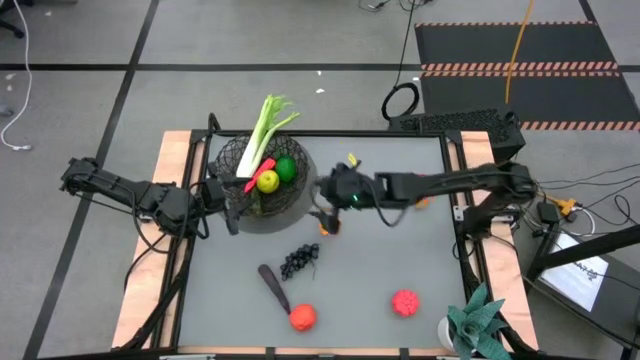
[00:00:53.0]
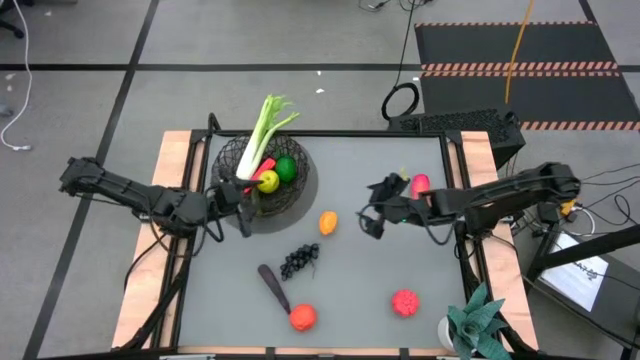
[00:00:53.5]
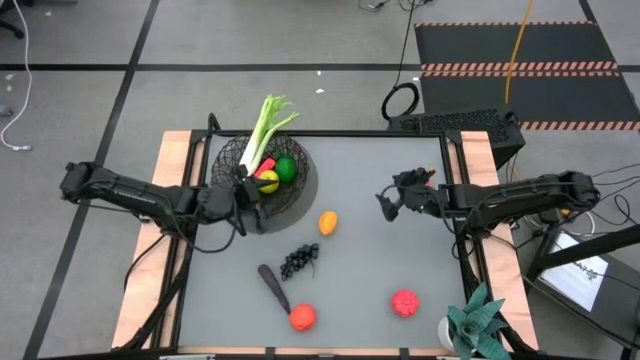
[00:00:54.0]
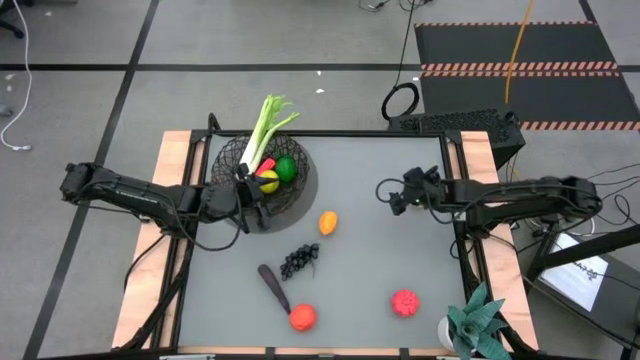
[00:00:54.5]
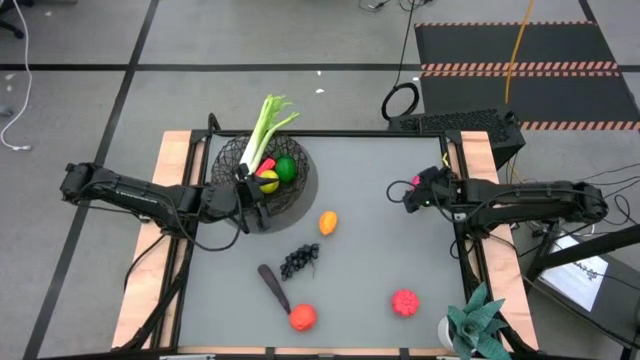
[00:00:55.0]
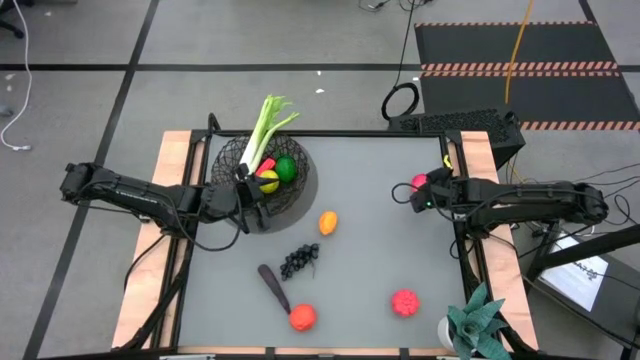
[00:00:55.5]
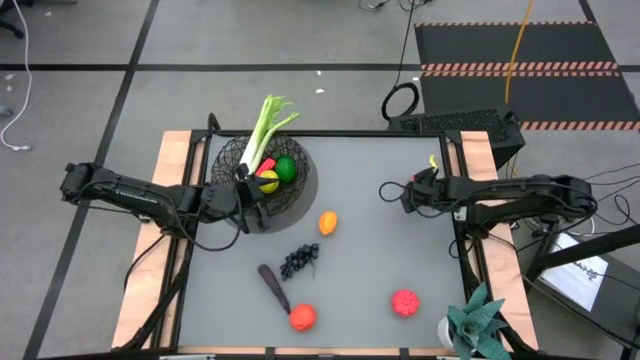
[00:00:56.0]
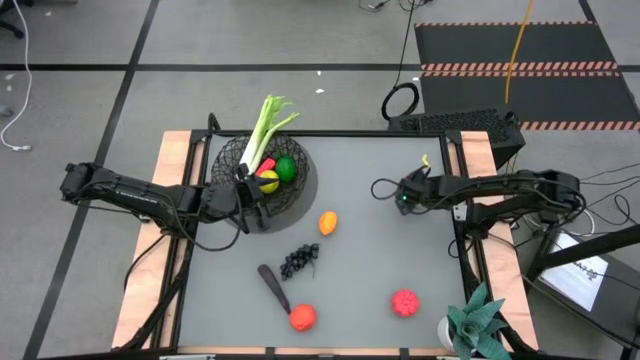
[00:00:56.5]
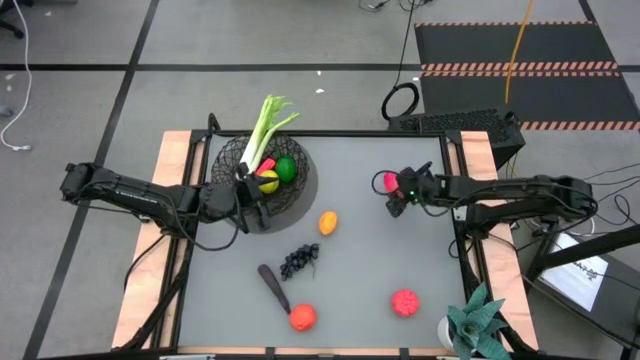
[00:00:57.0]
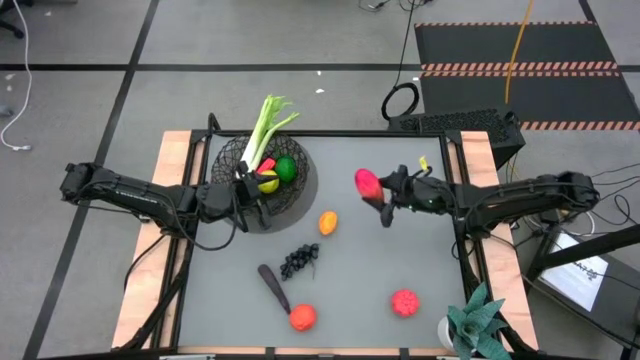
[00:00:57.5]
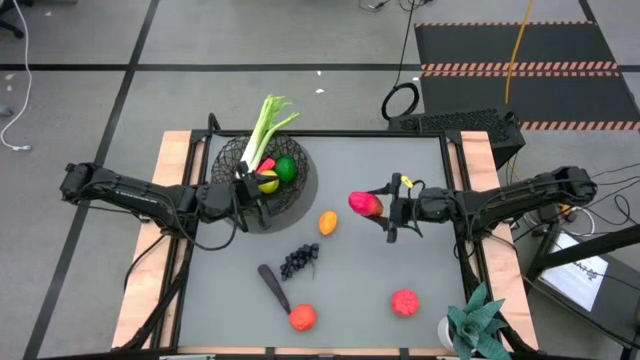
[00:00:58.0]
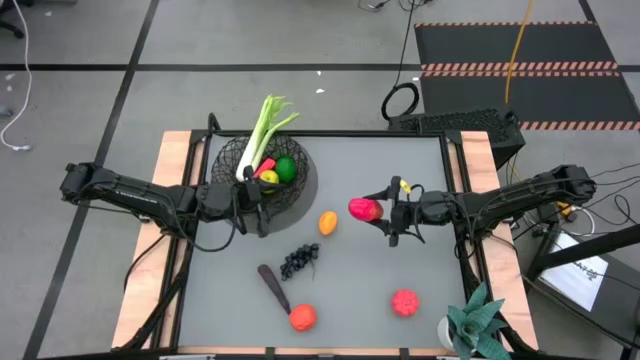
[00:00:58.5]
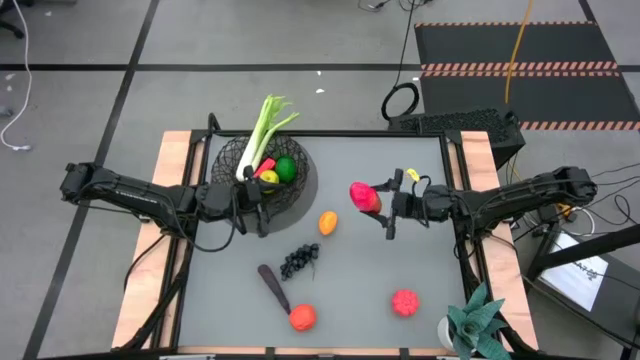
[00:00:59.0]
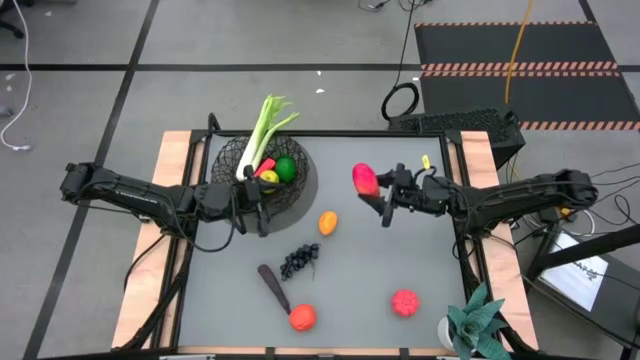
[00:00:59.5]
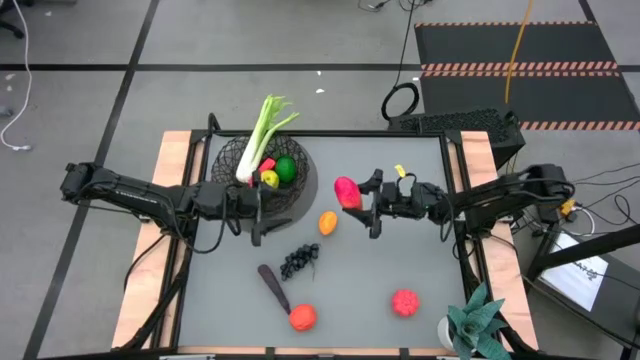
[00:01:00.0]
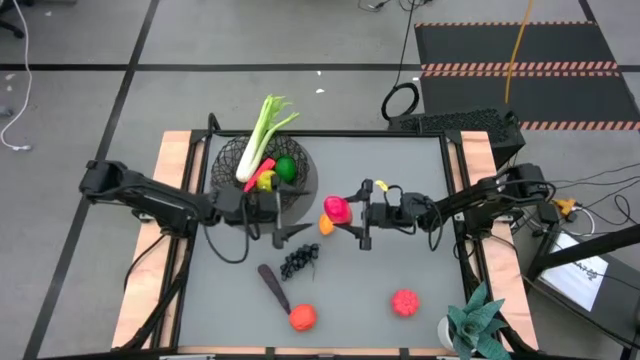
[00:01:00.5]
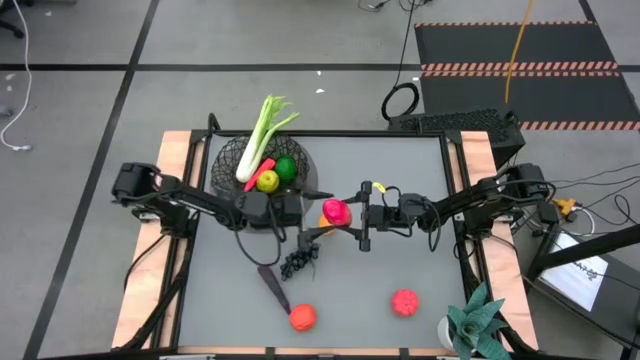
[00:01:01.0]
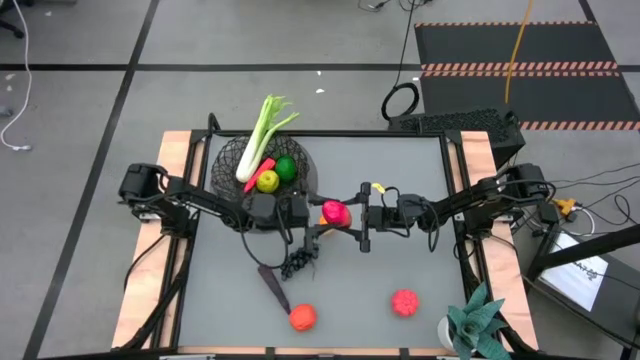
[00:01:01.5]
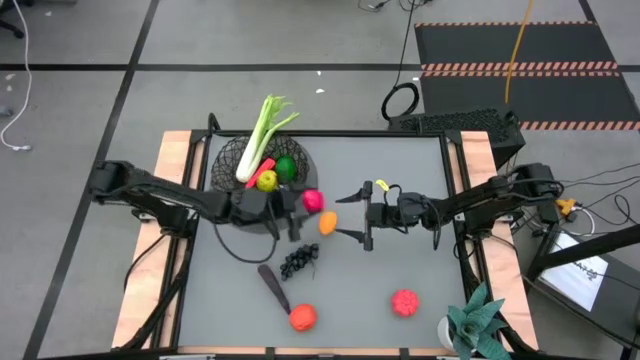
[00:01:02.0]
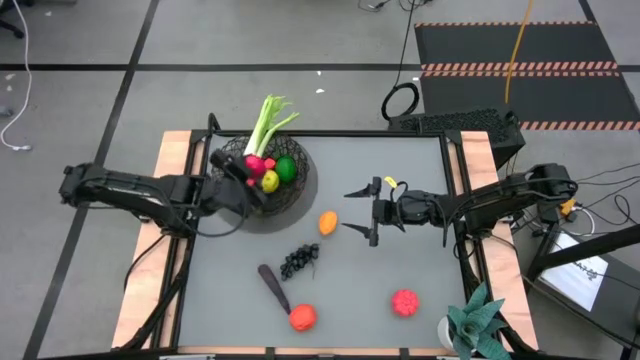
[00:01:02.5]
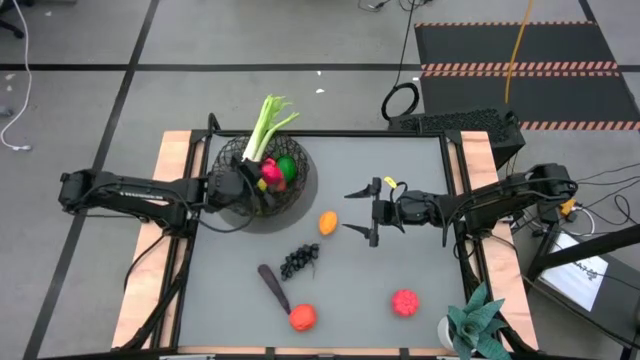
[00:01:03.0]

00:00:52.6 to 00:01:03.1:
Task: Build produce basket
Put the red mango into the wire basket

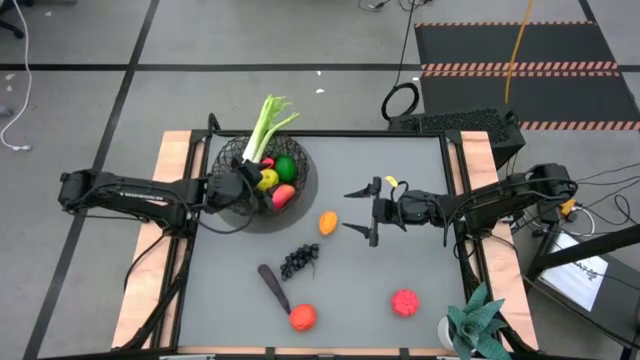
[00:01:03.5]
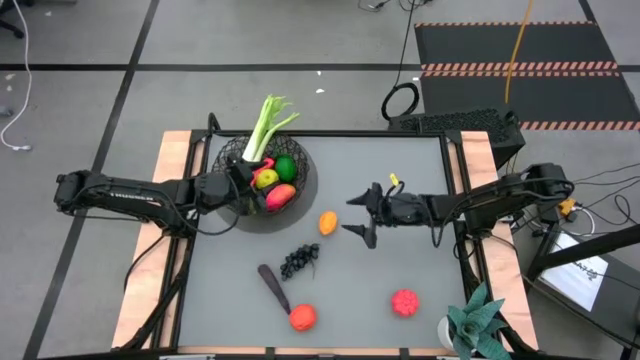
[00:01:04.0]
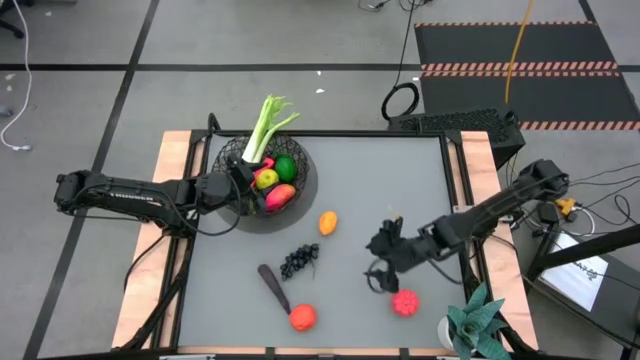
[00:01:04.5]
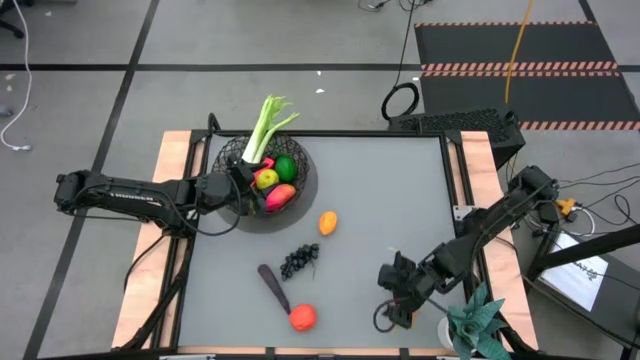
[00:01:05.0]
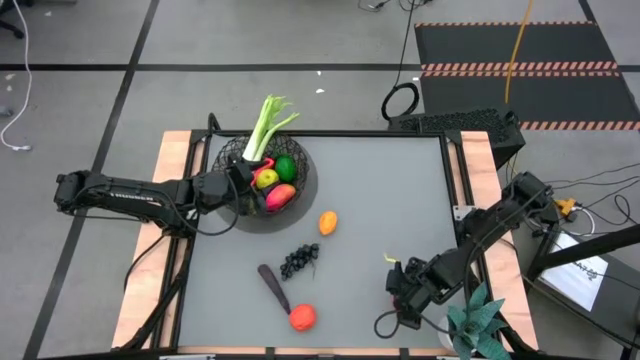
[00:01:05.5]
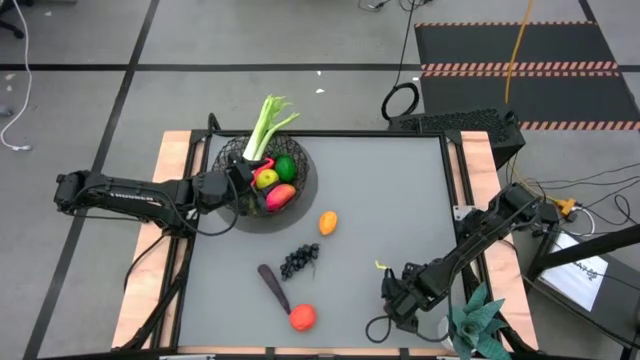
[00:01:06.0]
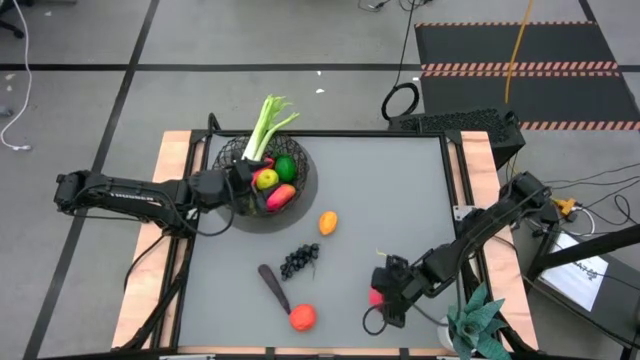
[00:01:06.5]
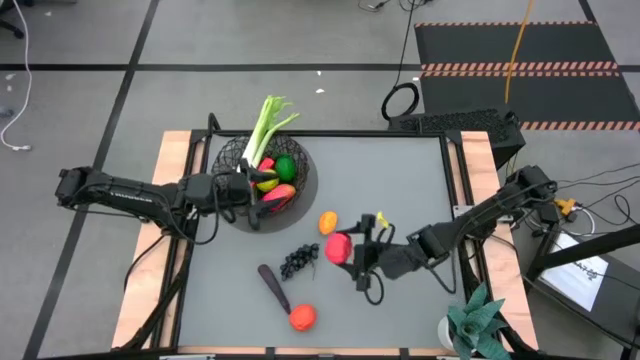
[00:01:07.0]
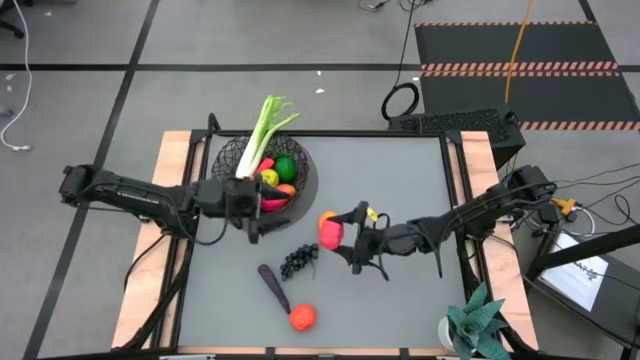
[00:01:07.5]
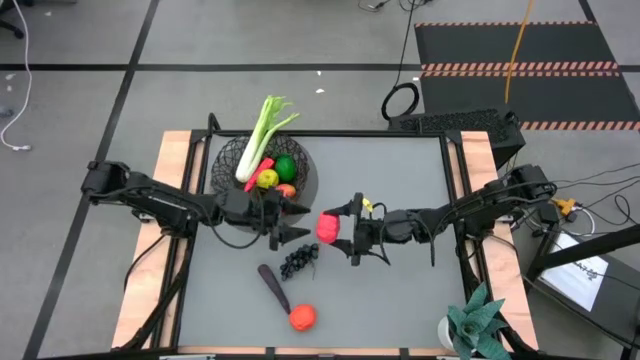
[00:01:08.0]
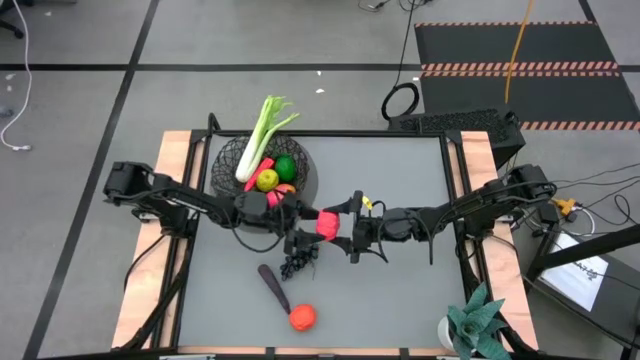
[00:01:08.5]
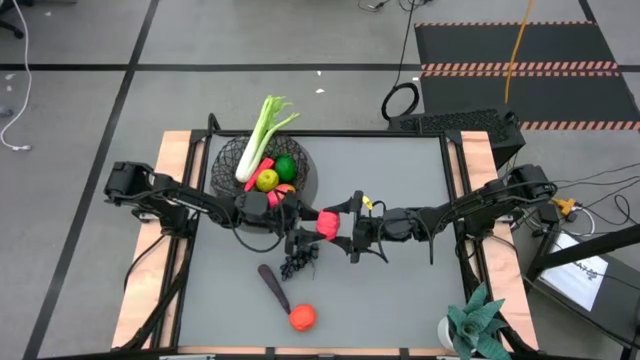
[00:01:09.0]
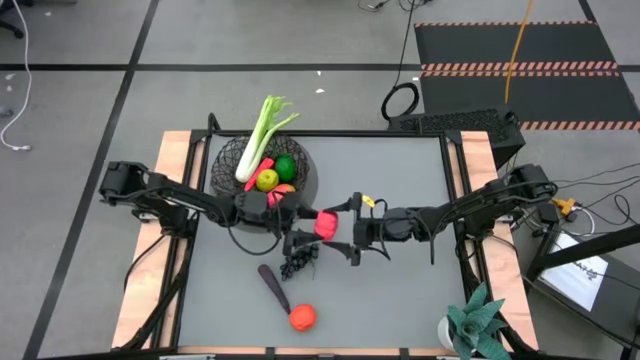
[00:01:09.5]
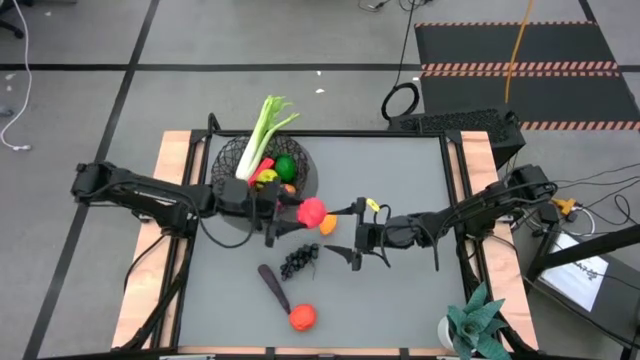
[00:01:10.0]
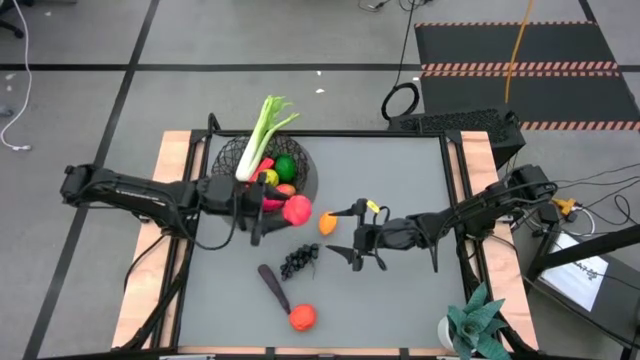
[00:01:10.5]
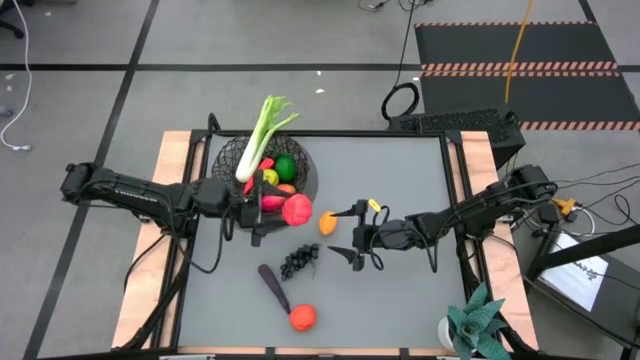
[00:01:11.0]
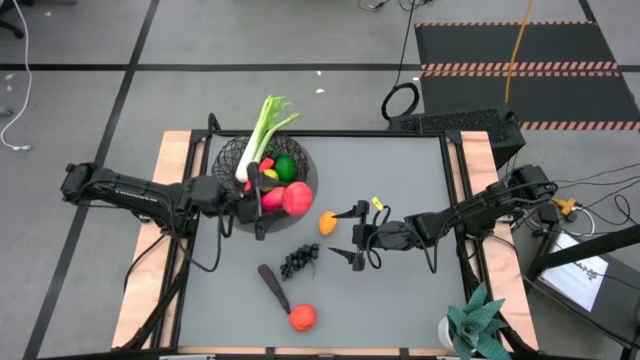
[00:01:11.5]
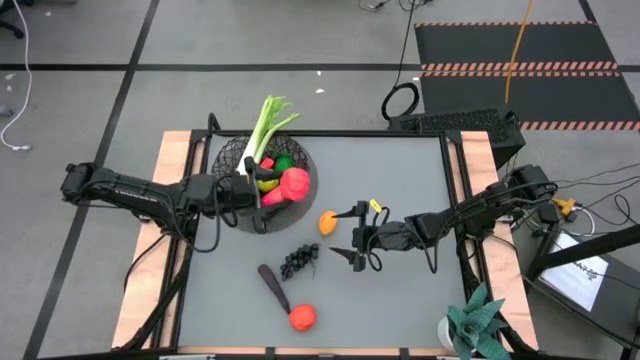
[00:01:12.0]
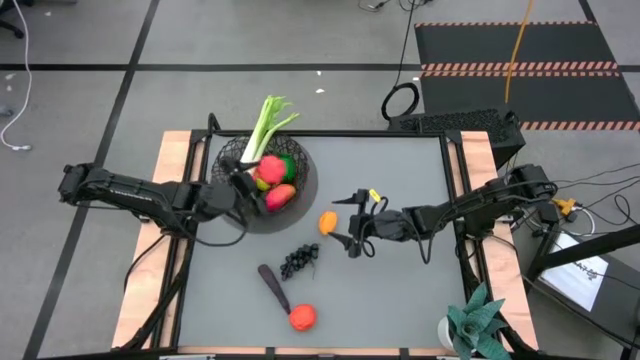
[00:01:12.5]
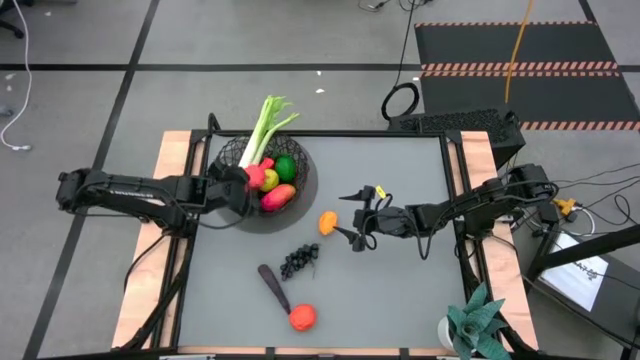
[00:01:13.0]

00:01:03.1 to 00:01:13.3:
Put the red tomato into the wire basket
